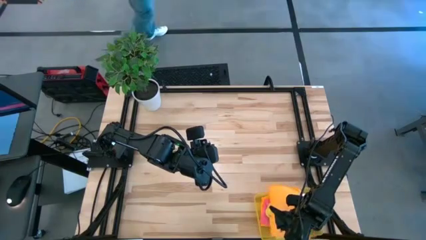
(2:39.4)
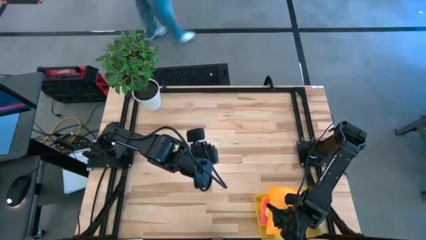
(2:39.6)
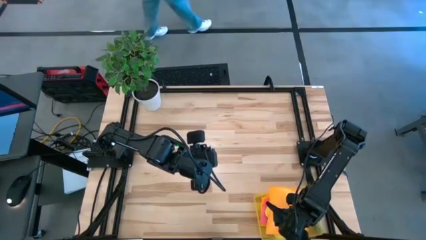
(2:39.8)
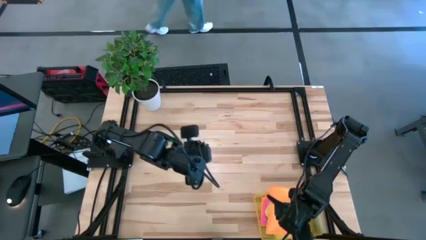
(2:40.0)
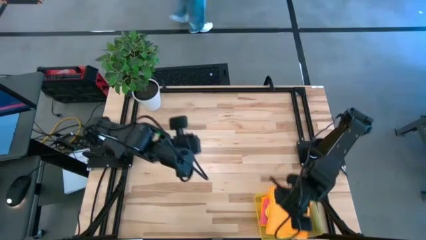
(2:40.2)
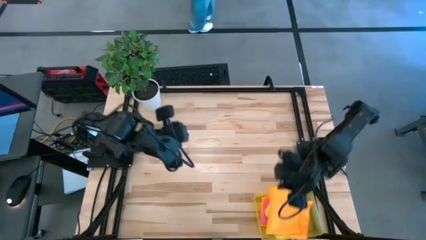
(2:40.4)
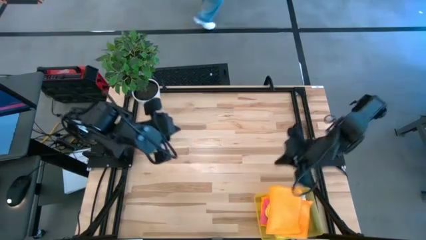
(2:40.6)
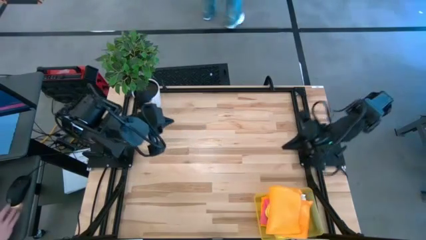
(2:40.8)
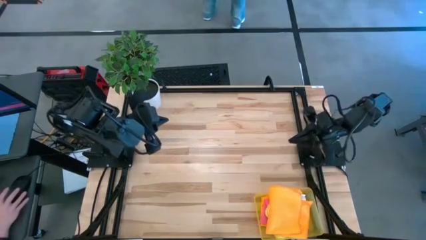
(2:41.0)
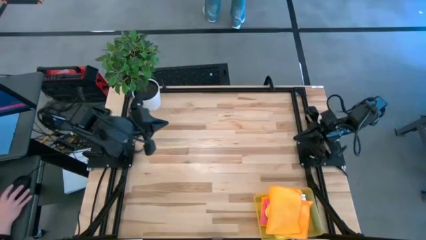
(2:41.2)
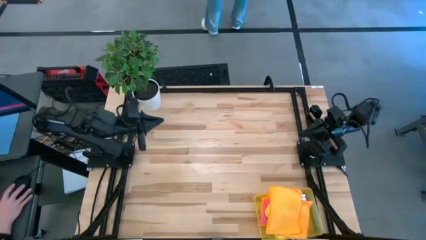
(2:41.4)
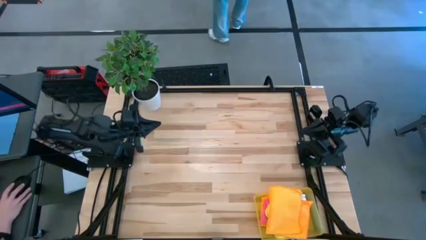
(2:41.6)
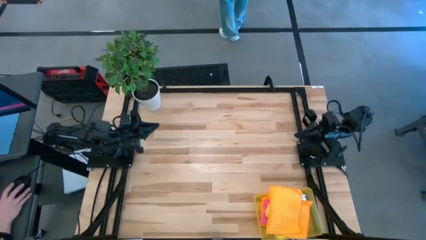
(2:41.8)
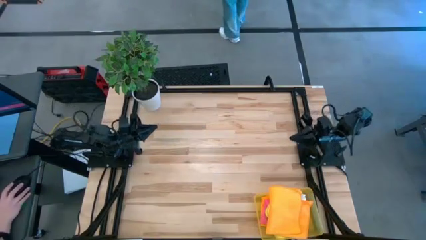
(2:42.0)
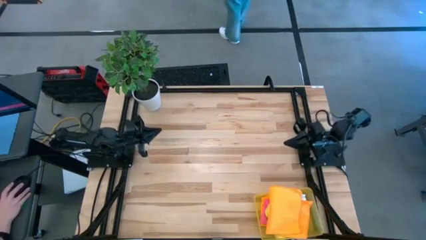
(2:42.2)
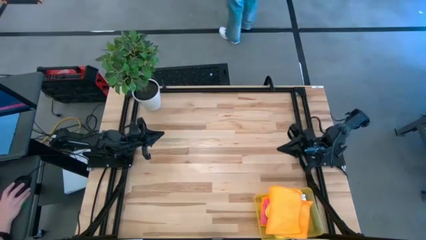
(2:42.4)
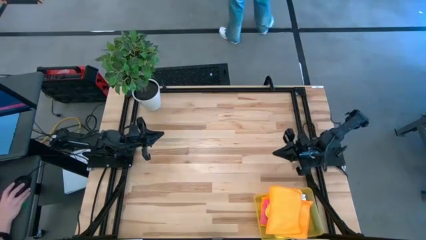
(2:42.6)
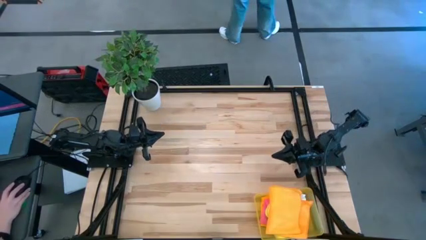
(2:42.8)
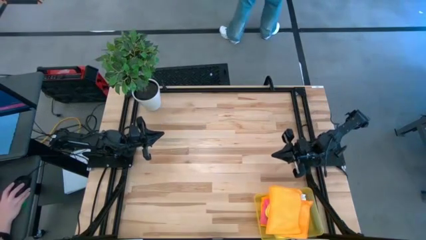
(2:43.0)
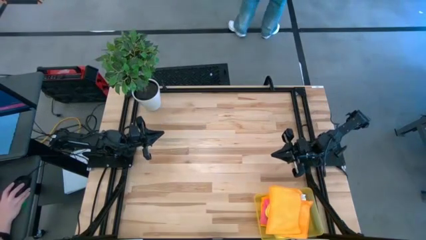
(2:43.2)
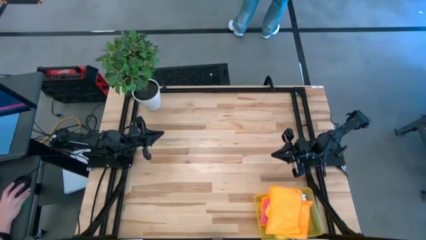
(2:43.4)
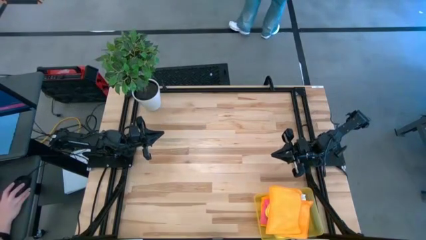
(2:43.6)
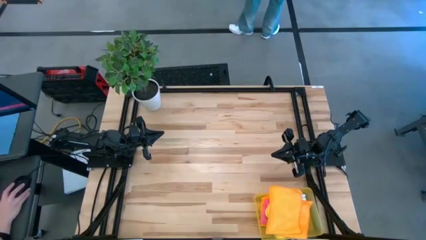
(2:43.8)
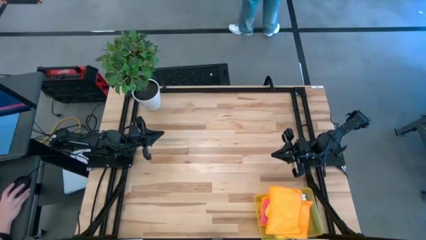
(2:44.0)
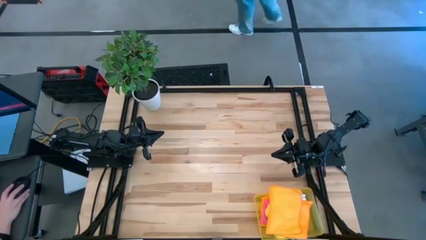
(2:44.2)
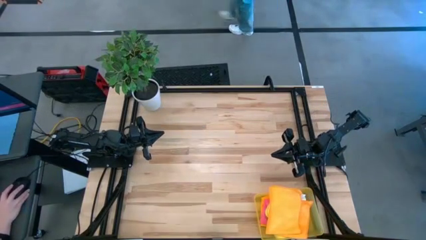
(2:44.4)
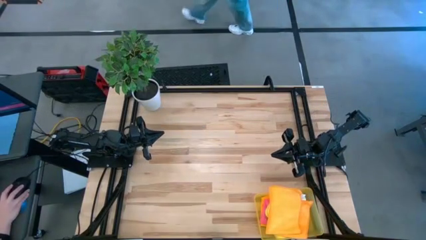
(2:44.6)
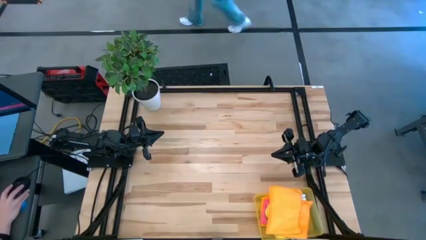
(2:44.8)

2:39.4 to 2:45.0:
Task: Fold microfiber towels
Return to Home Position

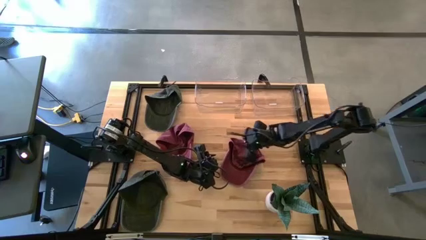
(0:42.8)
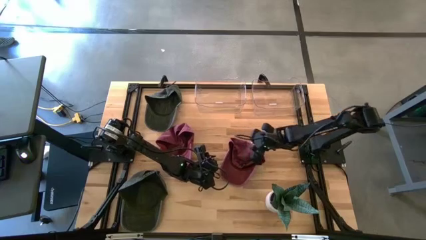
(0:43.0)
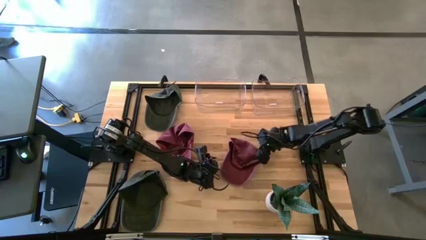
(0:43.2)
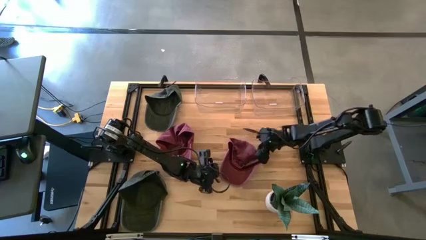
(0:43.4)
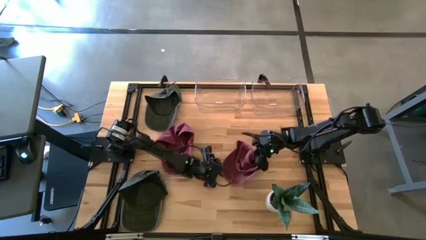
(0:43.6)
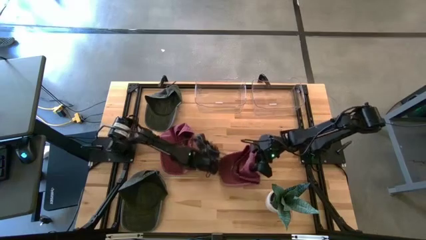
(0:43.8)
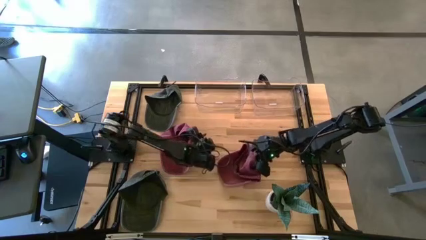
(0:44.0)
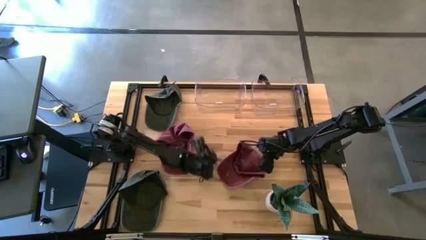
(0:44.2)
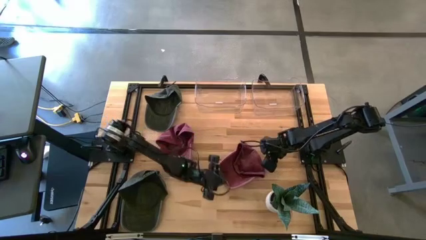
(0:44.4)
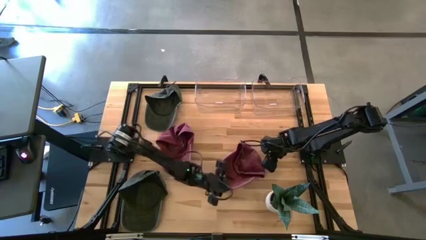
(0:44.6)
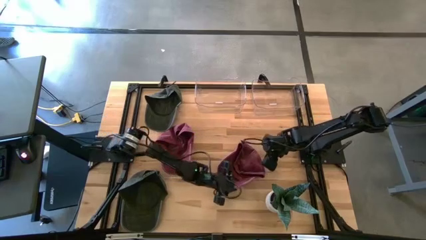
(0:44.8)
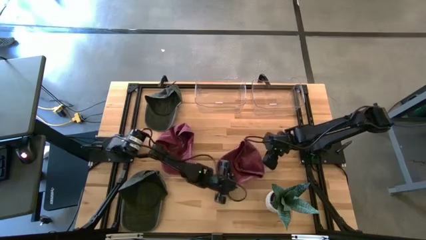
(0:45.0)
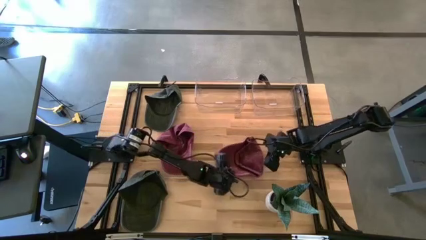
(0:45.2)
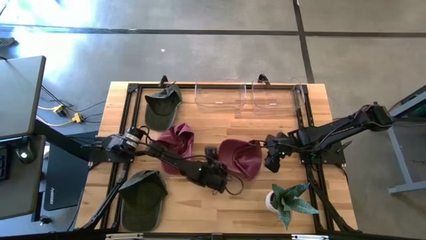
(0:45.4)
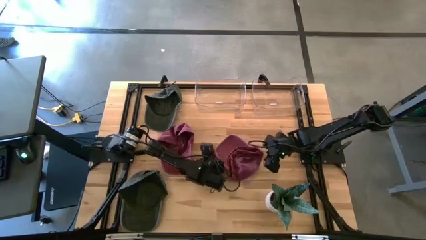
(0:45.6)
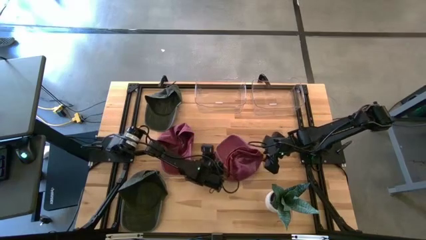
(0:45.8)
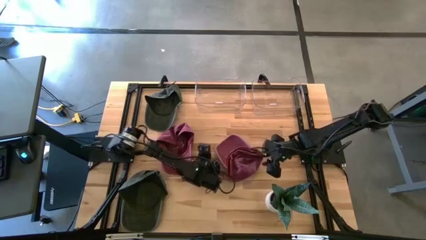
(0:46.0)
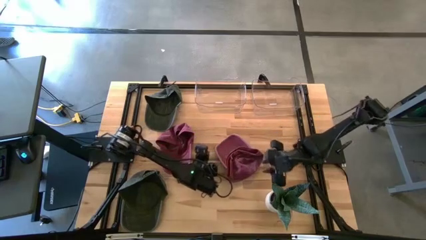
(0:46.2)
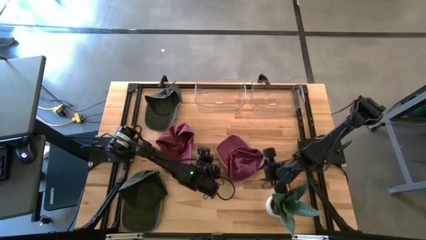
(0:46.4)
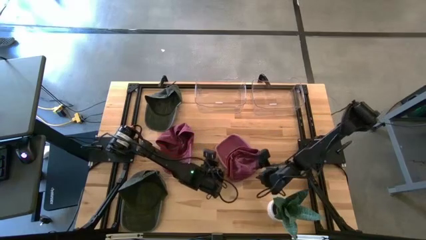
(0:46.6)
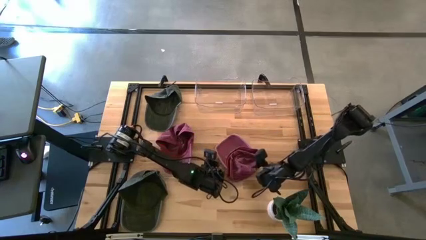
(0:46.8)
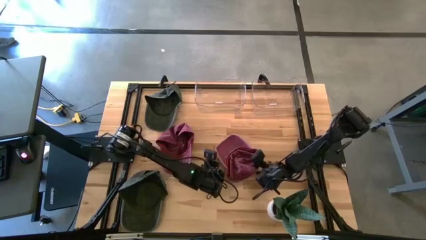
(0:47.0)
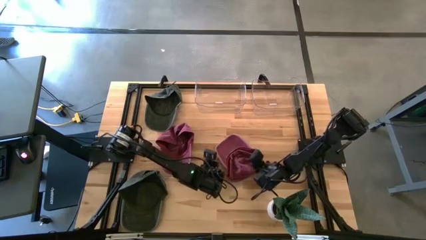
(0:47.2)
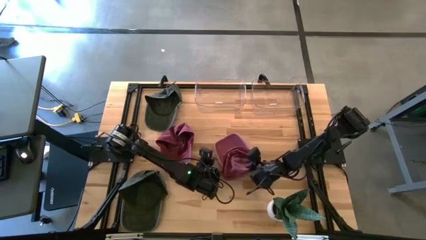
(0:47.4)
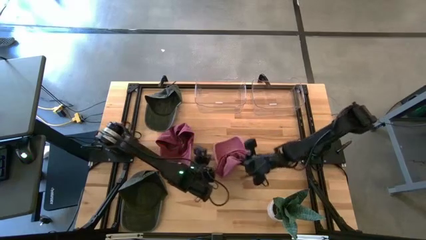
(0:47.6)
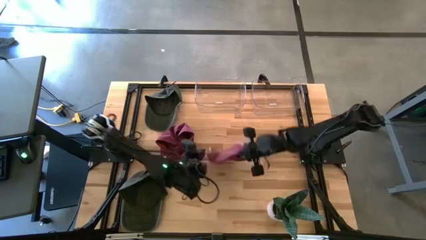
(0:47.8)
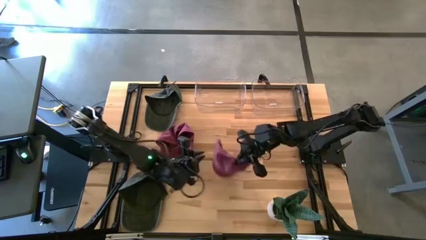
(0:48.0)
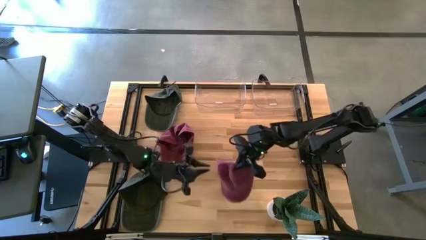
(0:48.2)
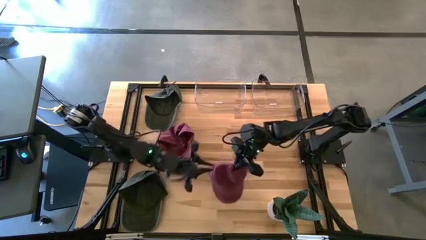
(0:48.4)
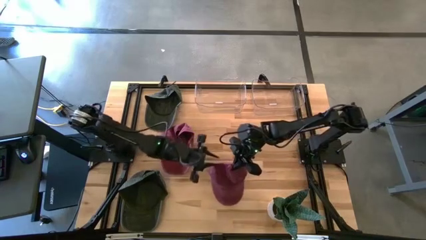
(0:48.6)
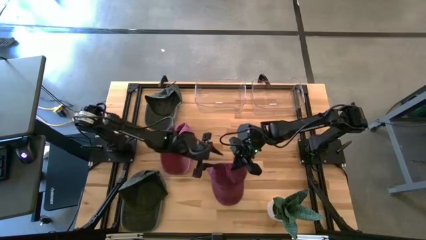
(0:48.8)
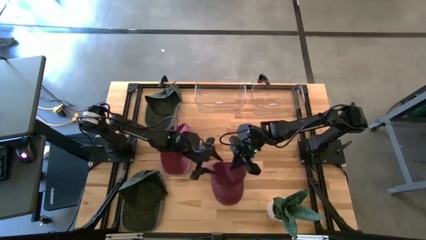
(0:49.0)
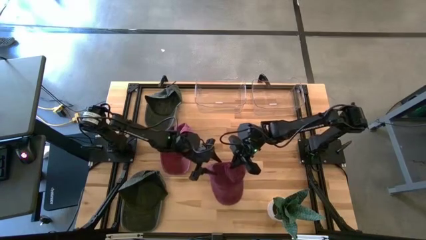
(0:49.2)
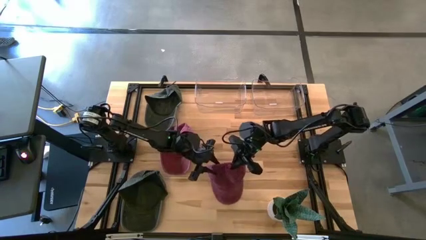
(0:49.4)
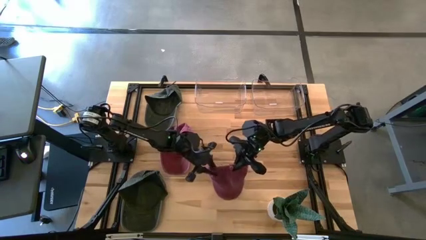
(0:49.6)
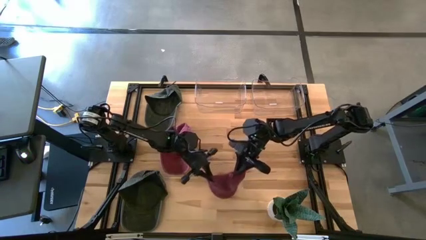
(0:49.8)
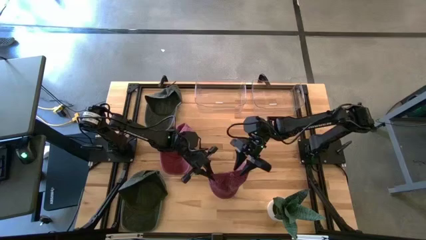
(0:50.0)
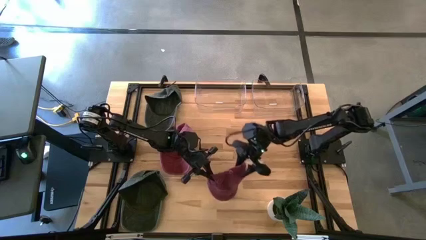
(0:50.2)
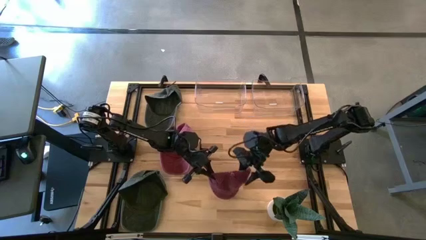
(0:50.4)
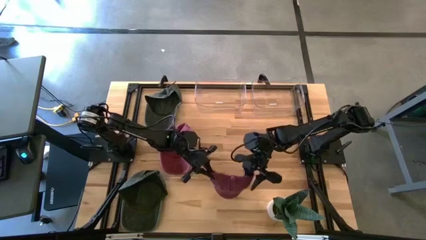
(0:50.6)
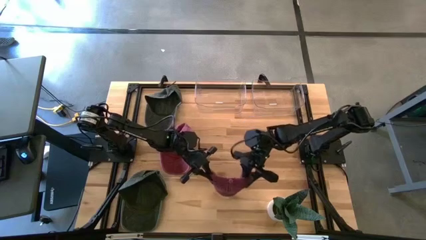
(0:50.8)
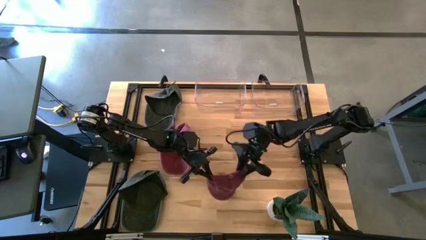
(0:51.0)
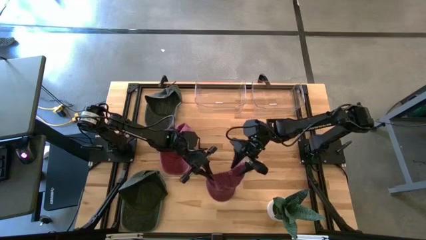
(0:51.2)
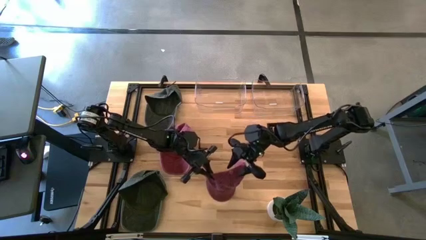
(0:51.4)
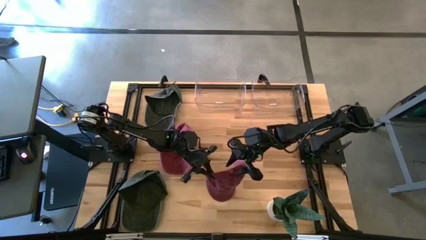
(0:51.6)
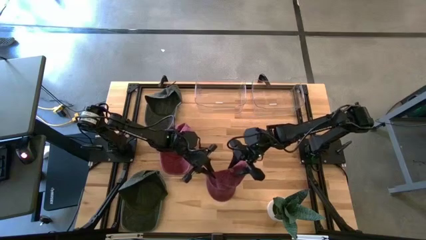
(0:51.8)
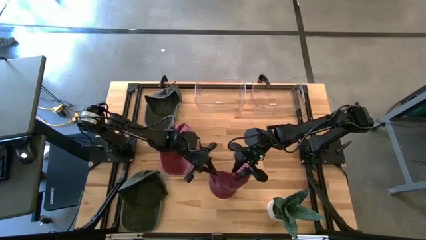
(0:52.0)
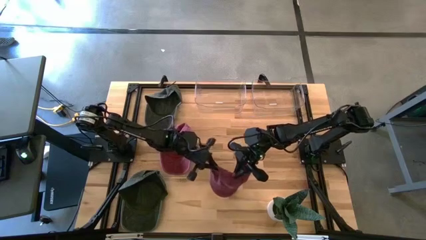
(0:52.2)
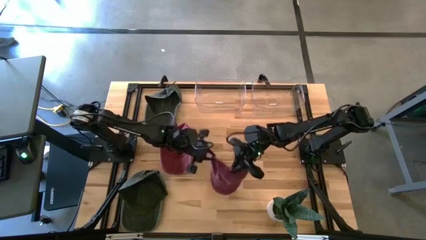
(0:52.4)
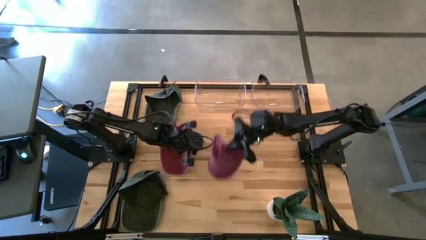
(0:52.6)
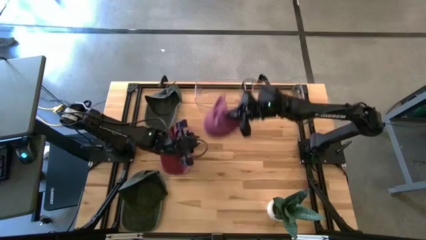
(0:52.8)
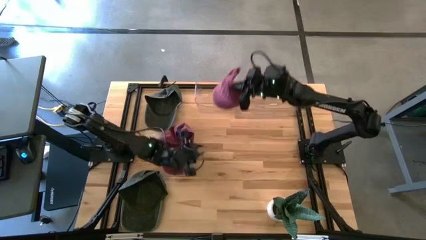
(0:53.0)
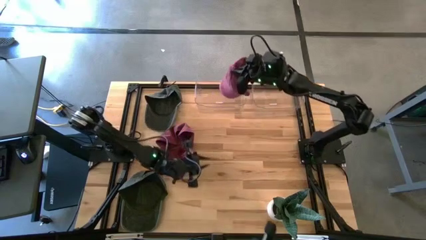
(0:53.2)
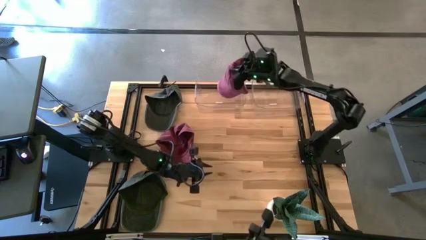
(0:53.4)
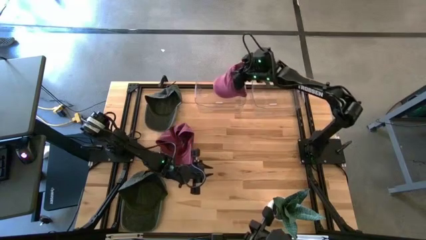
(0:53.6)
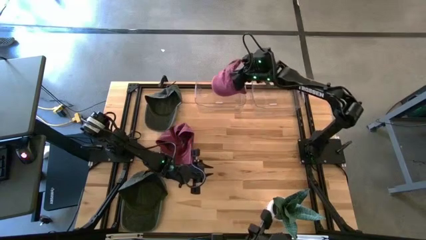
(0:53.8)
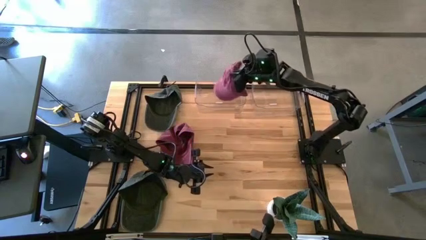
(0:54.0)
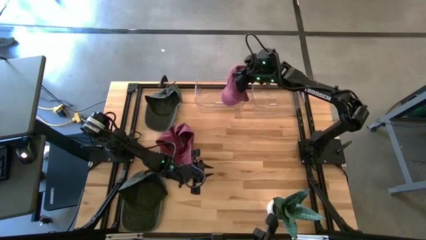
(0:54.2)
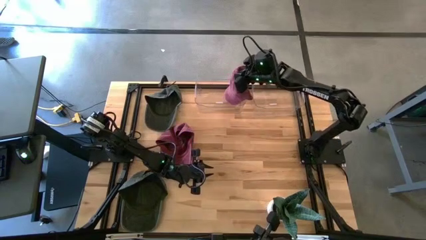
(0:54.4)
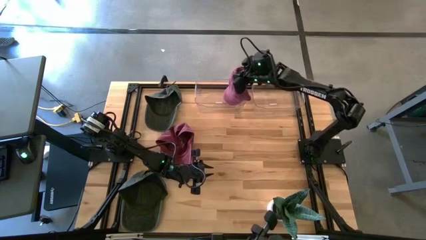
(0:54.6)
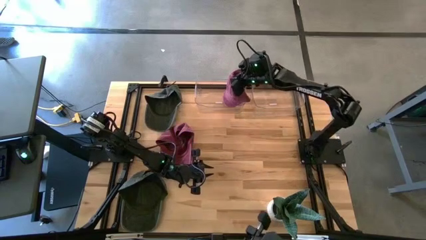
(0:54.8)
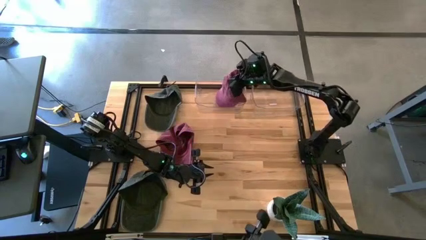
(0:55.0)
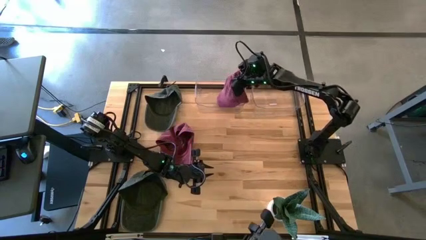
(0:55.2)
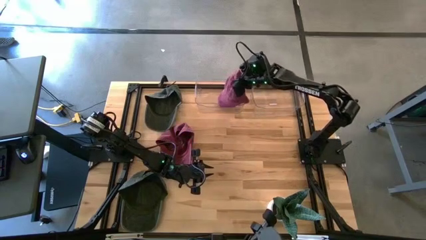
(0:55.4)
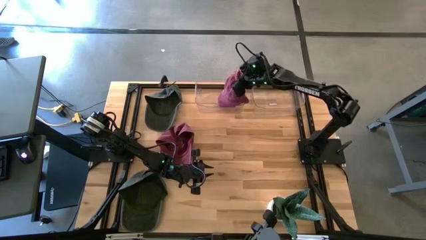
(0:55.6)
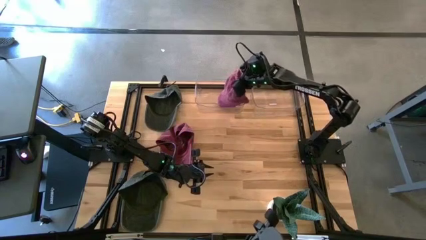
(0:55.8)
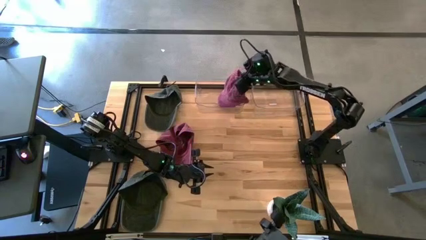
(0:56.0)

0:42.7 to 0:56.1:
Task: Pick & Place hat
Put the right red cap into the left transparent bin
